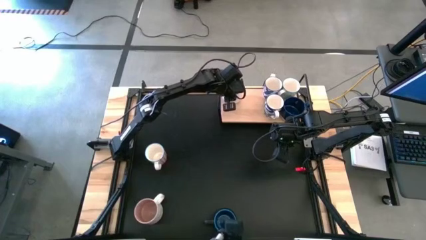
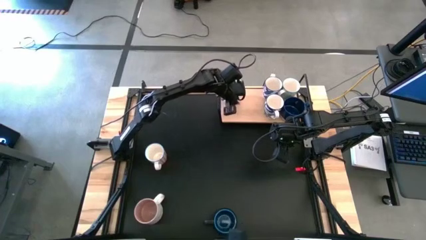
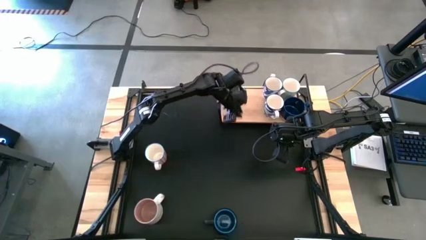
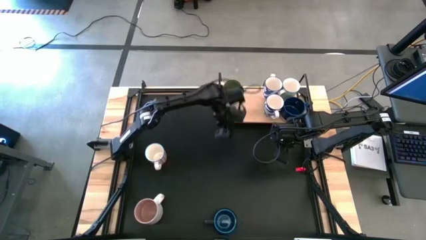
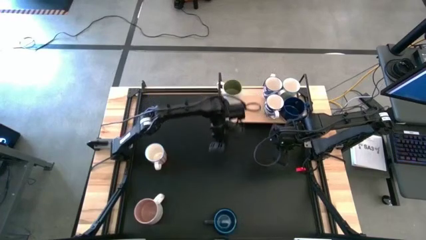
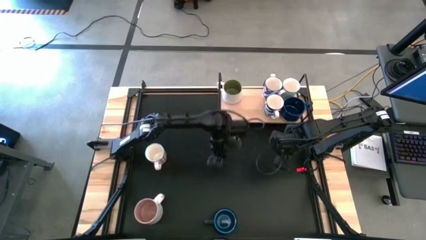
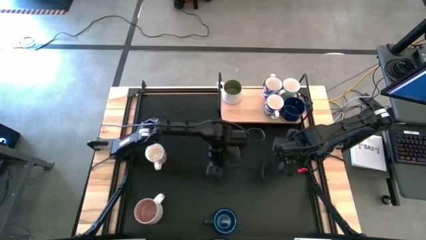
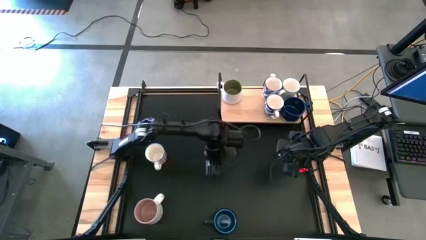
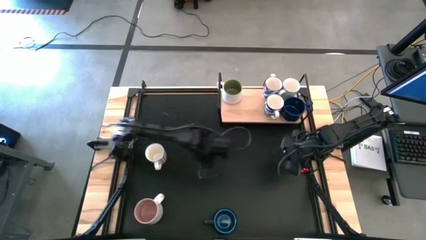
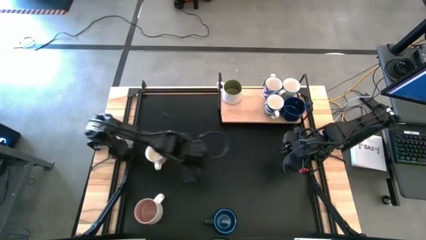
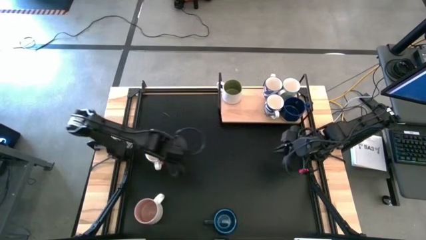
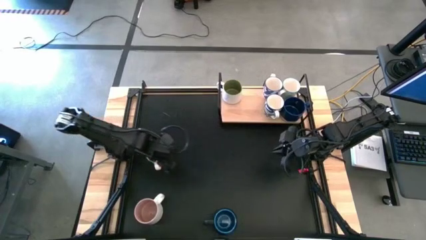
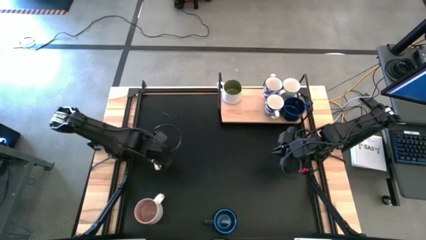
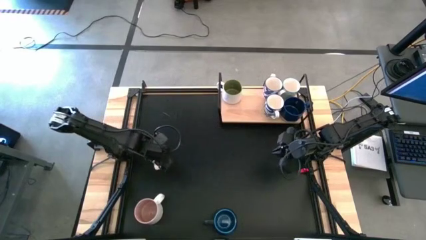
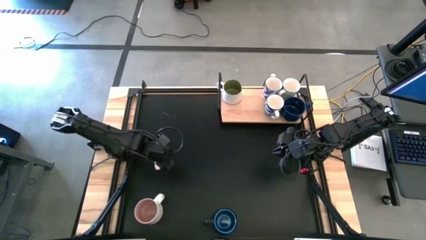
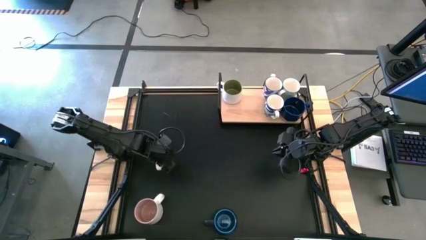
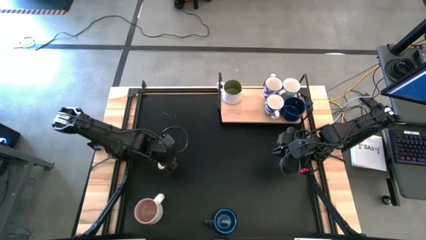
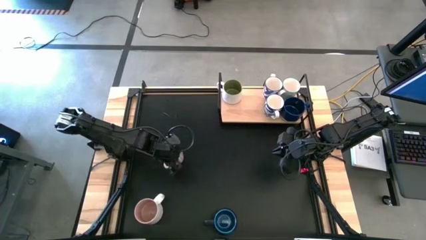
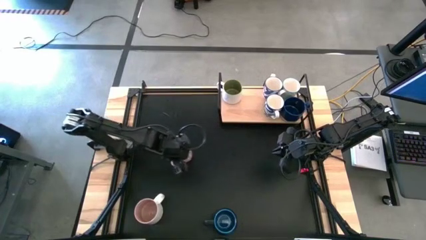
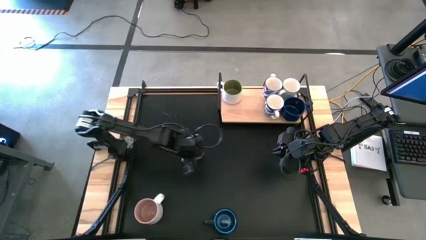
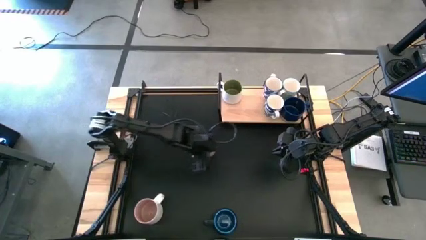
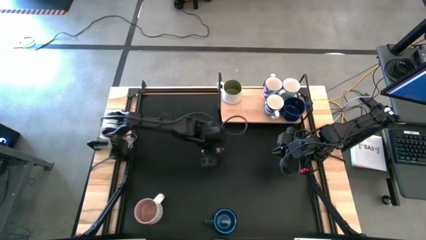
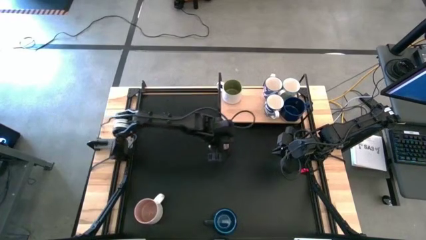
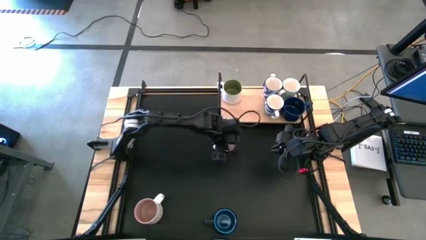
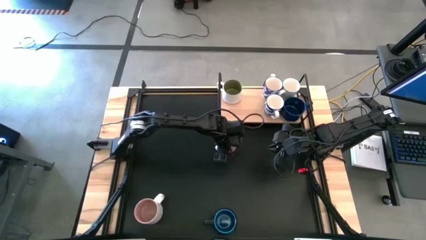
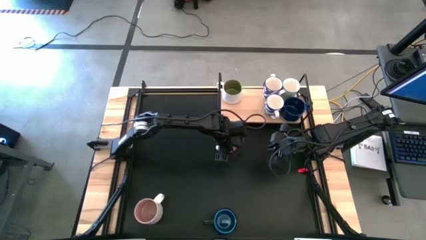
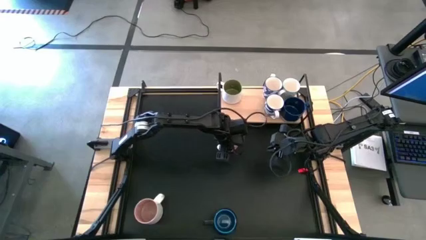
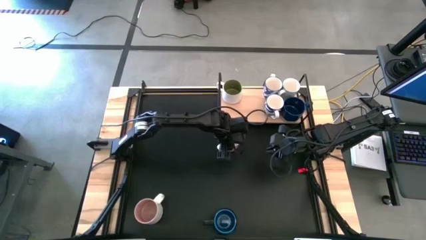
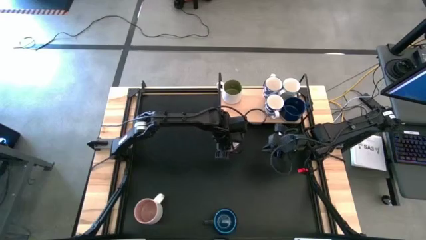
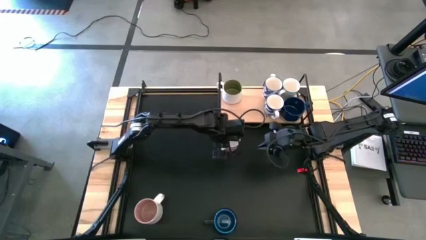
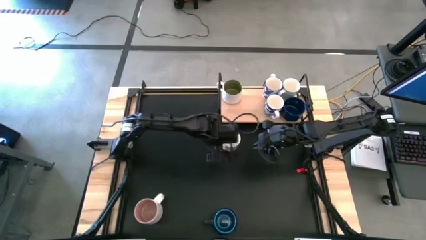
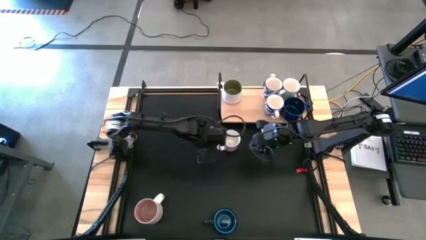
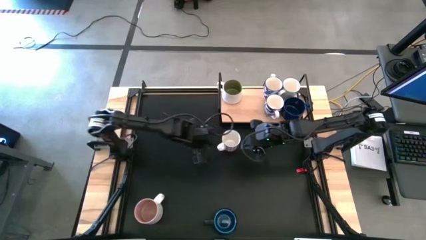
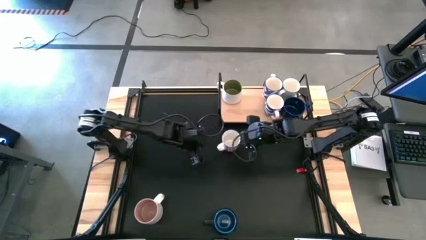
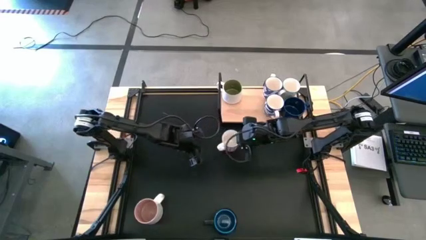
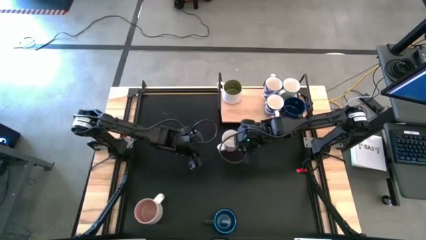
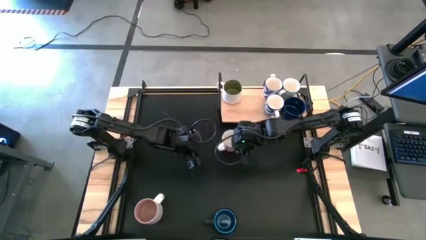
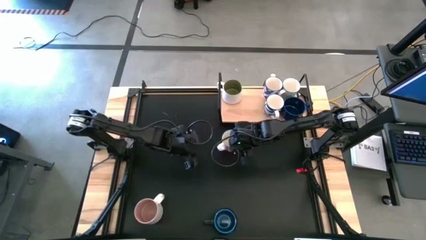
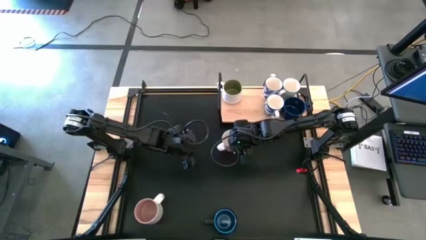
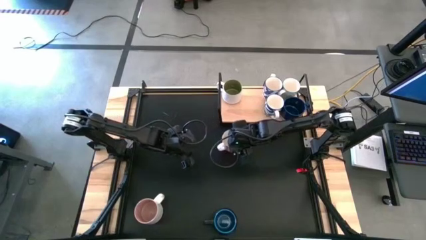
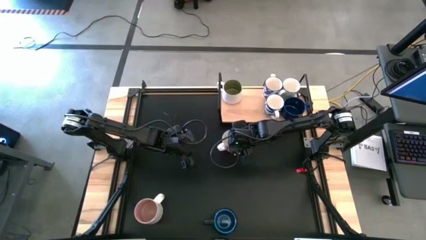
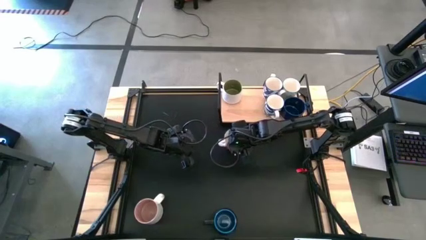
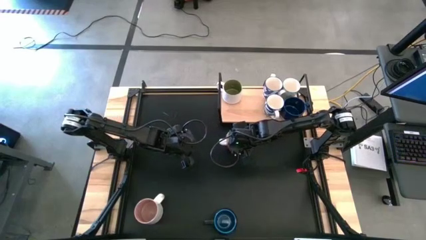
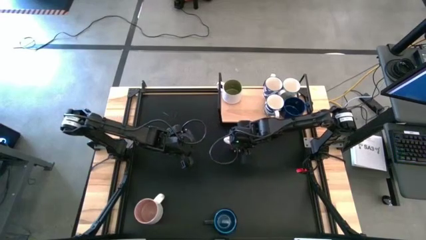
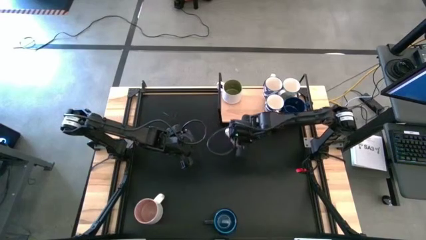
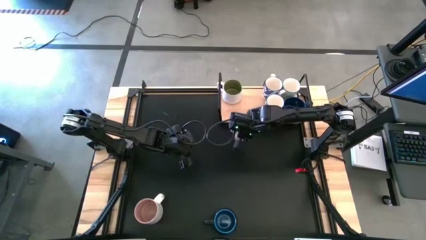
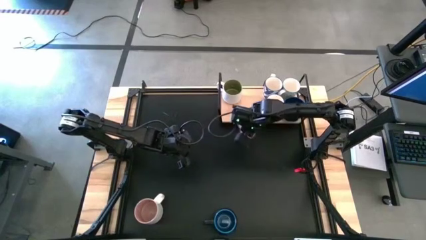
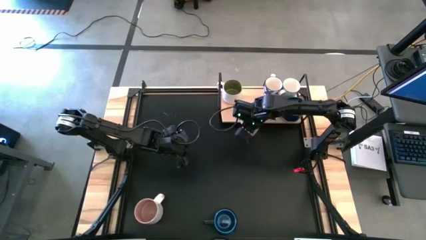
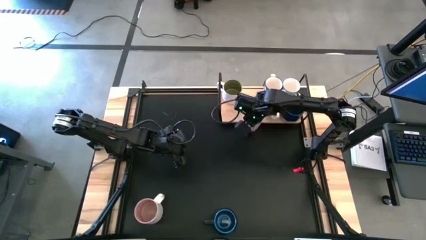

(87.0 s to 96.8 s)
Task: Place coffee mugs
Put the red patterned mug on the shelf

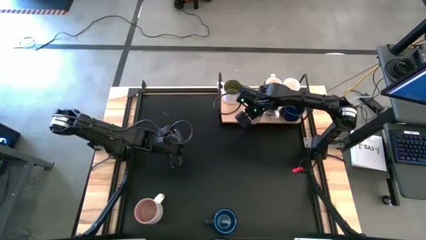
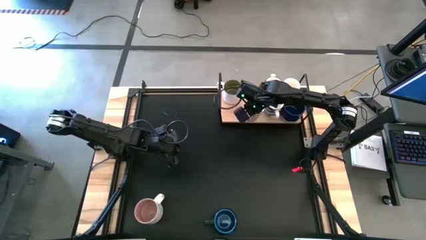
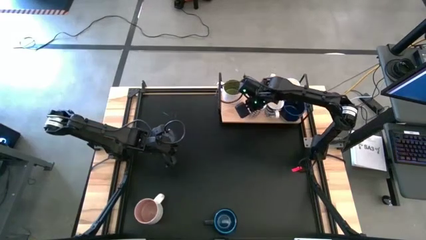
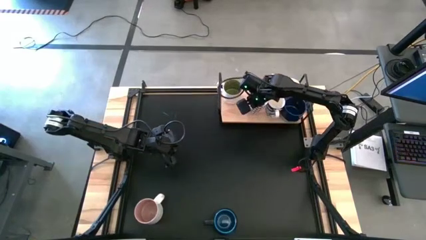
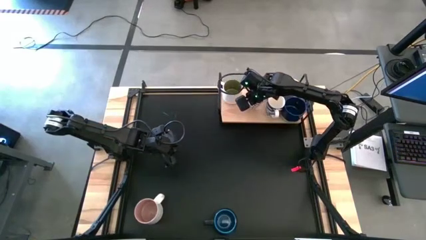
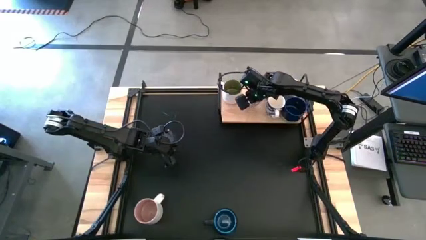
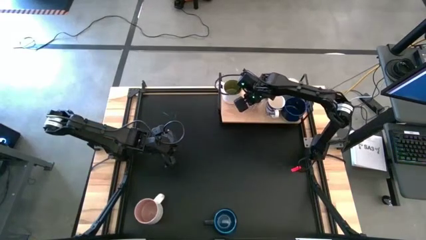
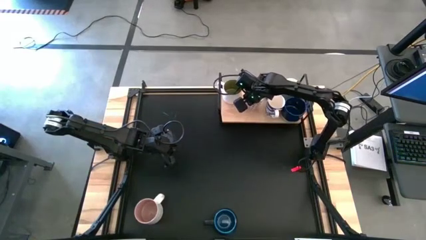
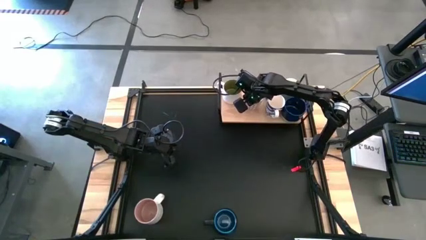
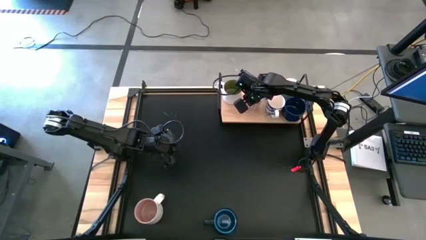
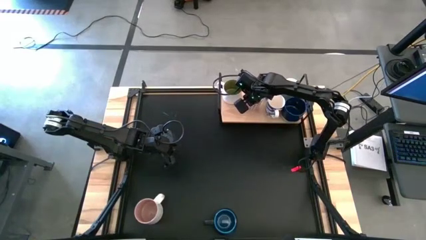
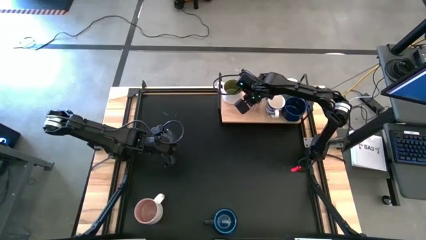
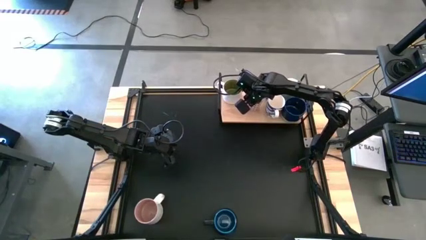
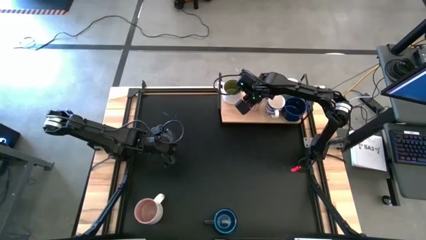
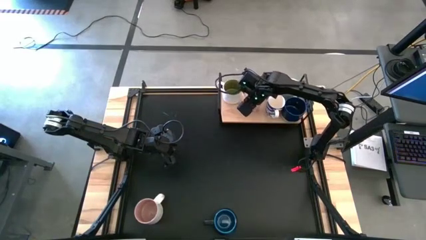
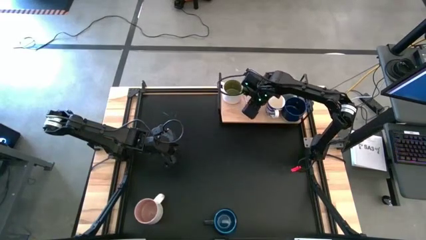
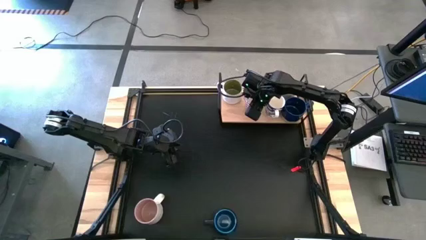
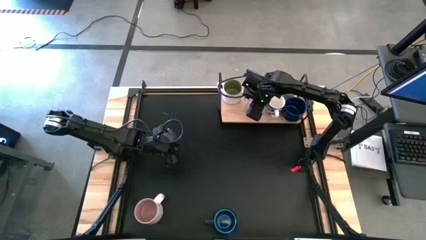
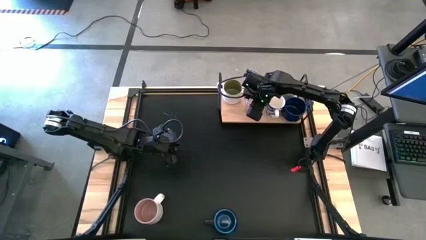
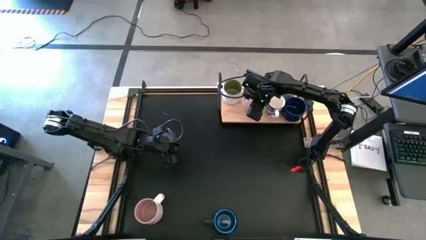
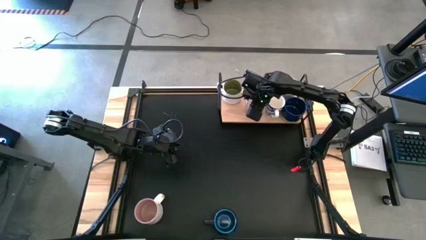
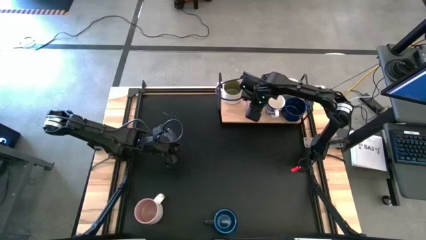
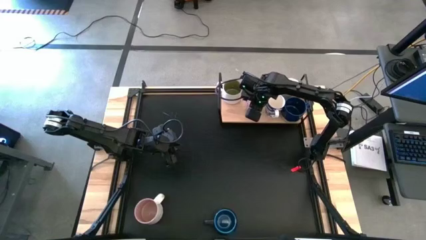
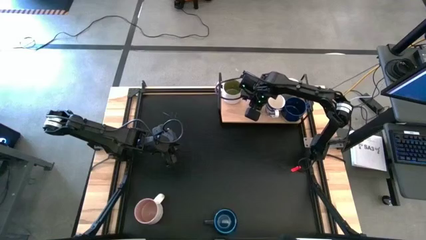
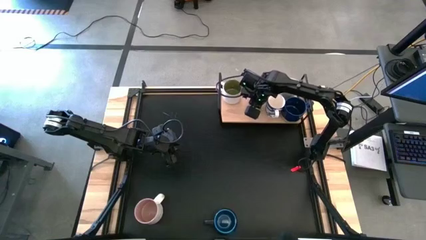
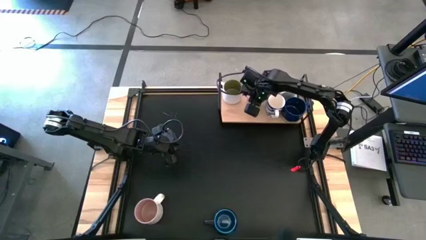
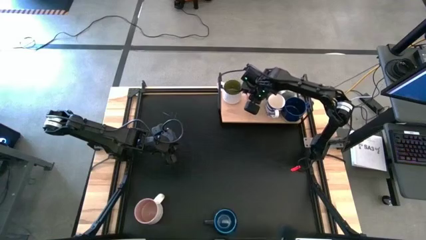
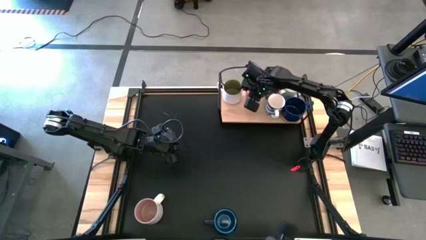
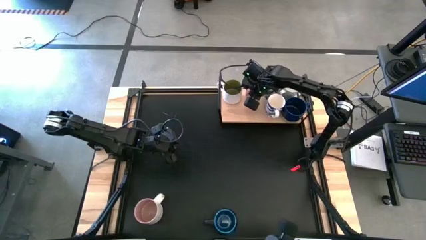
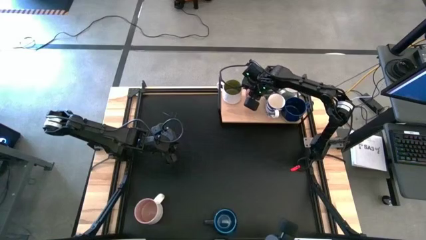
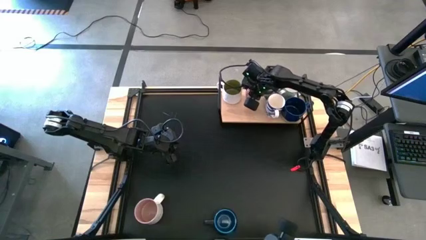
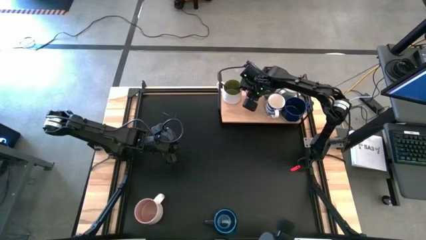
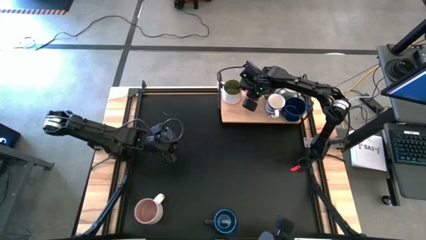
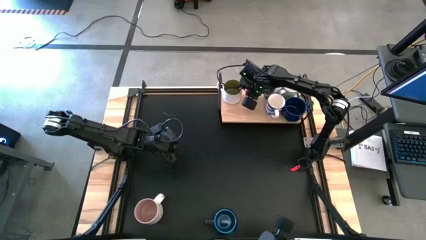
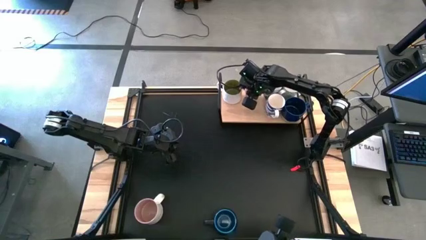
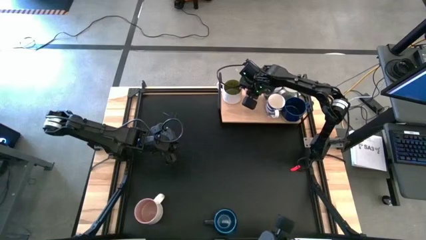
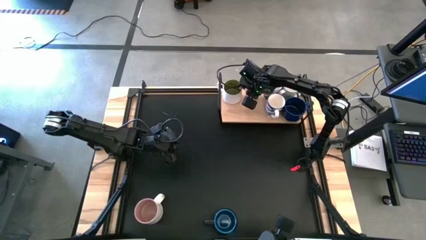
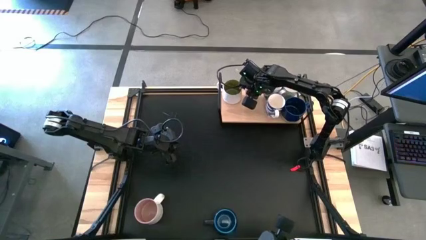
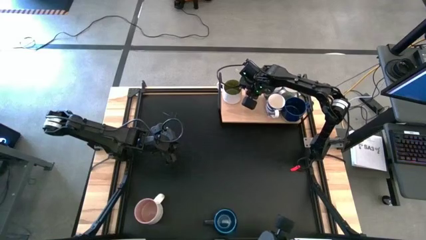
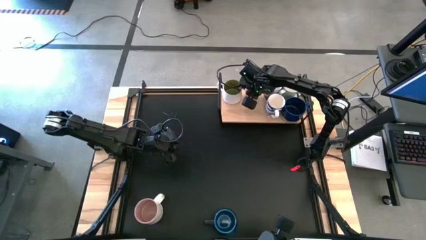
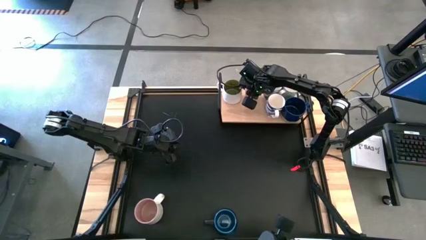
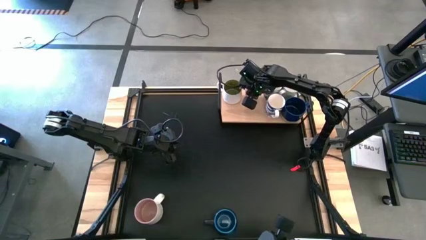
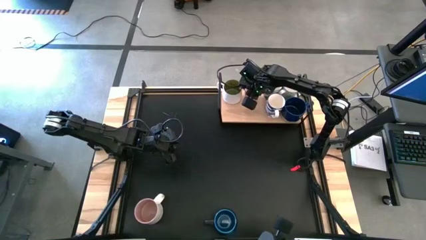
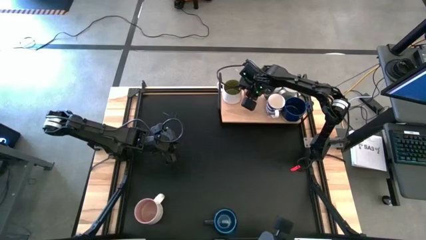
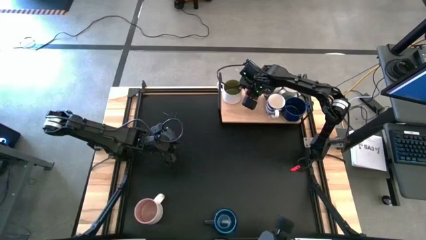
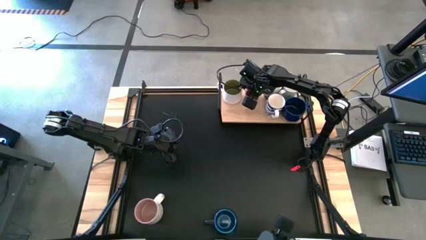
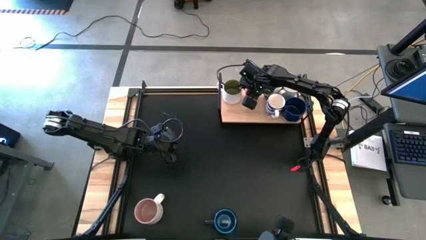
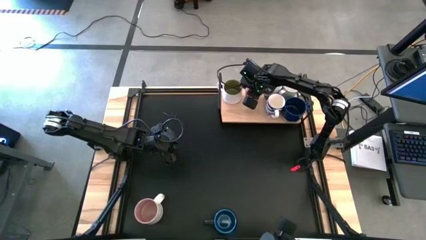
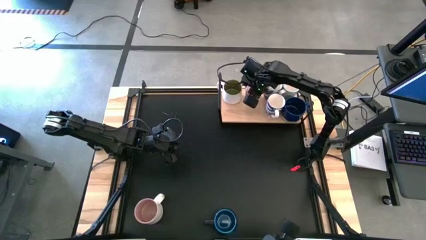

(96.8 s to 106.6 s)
Put the red patterned mug on the shelf
